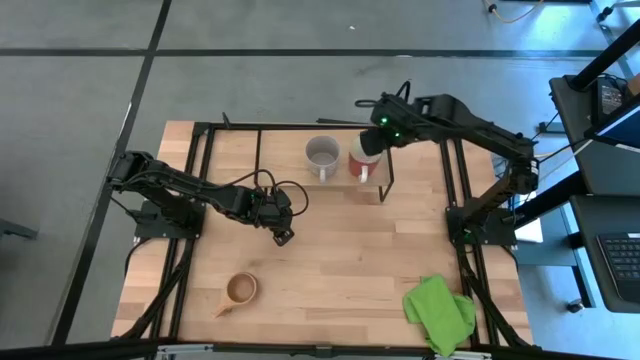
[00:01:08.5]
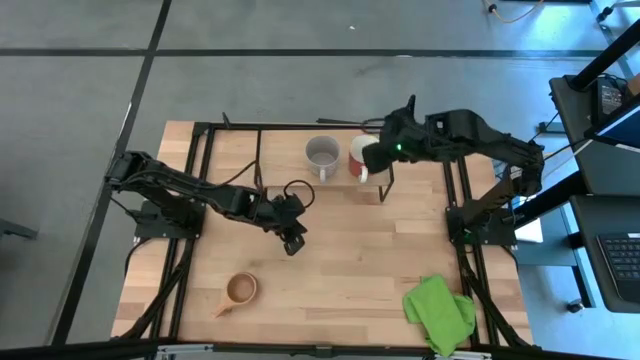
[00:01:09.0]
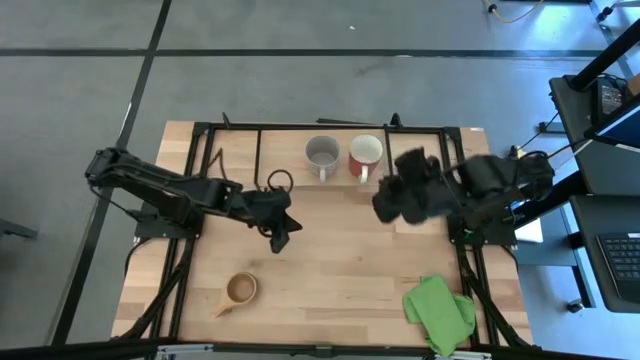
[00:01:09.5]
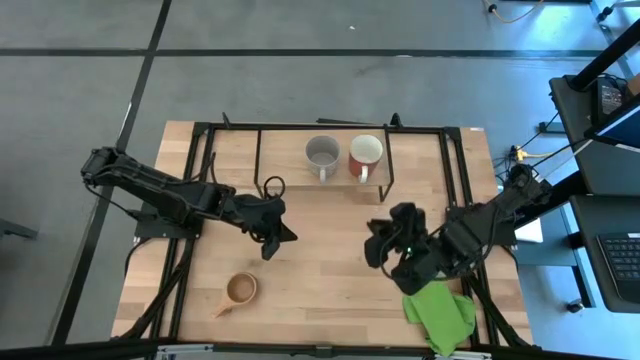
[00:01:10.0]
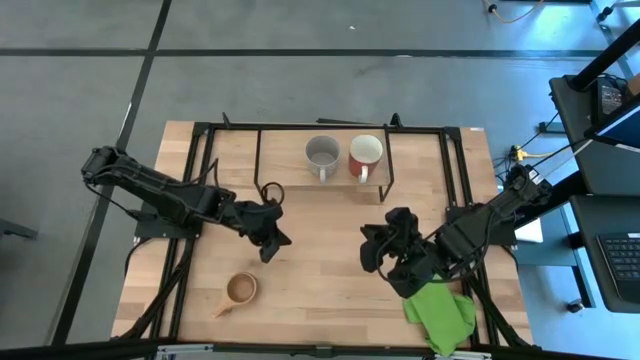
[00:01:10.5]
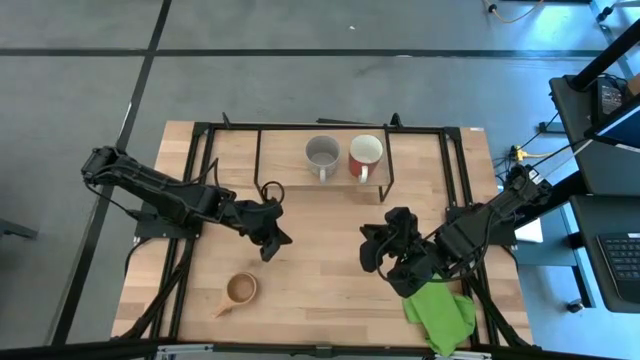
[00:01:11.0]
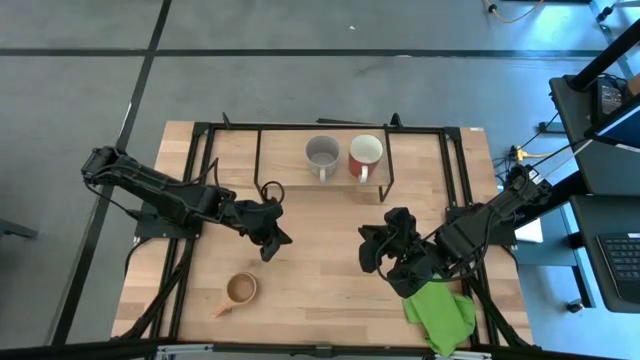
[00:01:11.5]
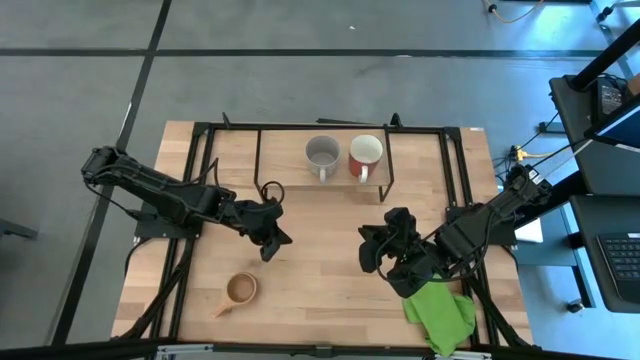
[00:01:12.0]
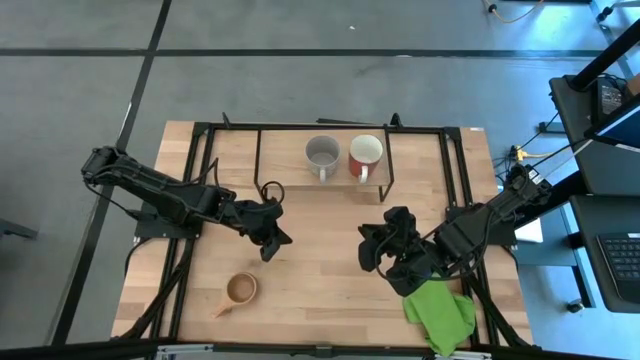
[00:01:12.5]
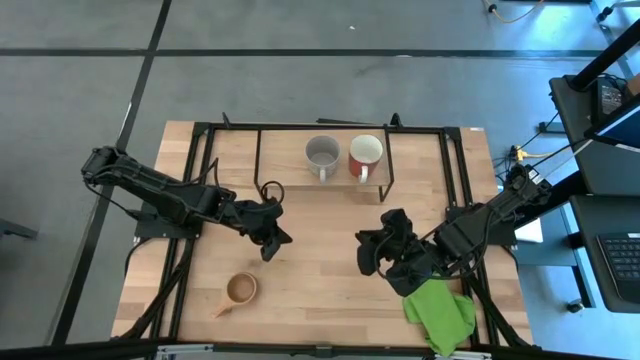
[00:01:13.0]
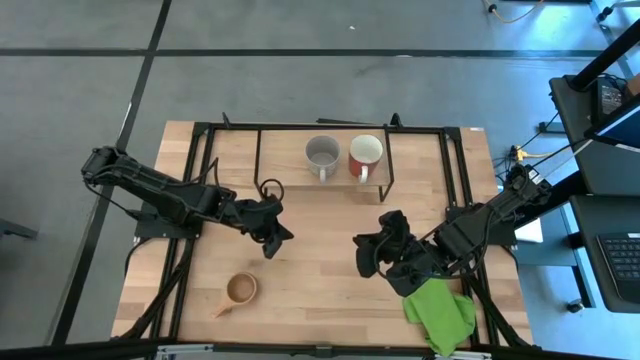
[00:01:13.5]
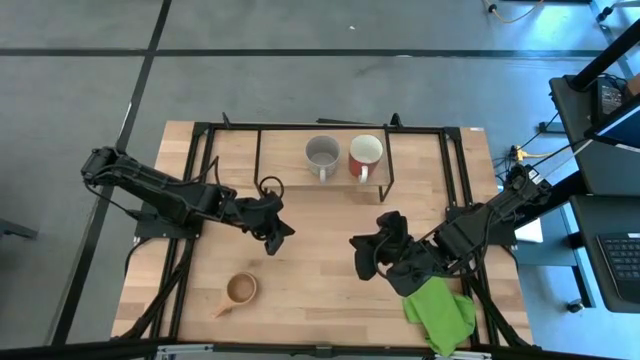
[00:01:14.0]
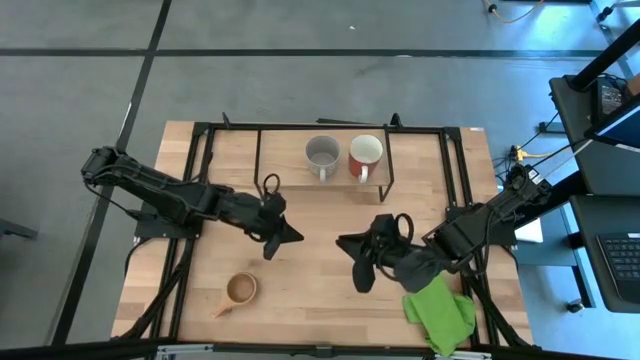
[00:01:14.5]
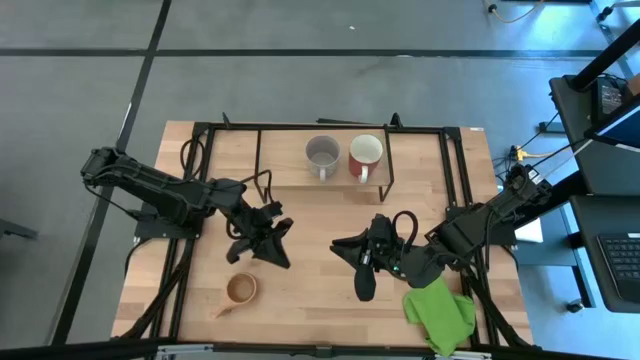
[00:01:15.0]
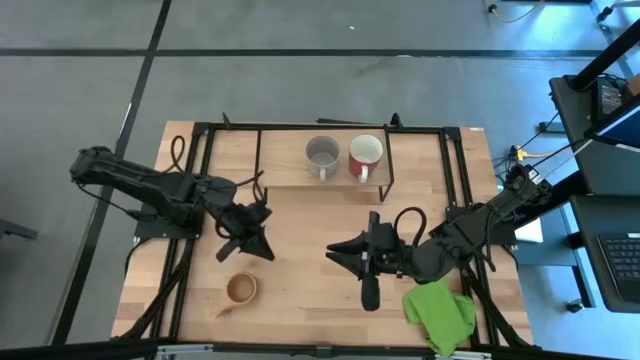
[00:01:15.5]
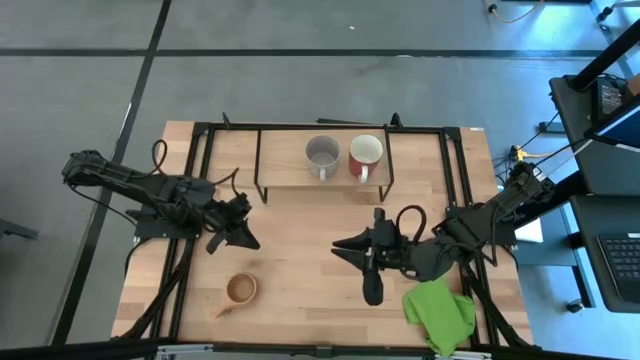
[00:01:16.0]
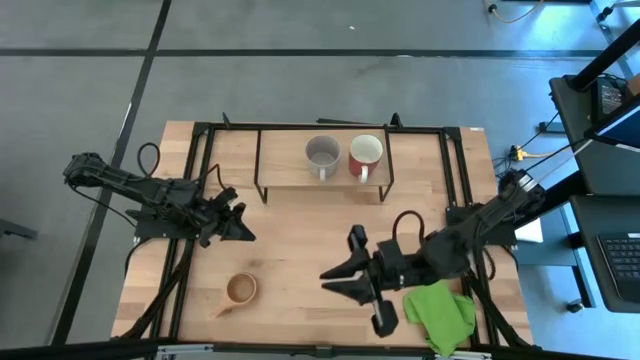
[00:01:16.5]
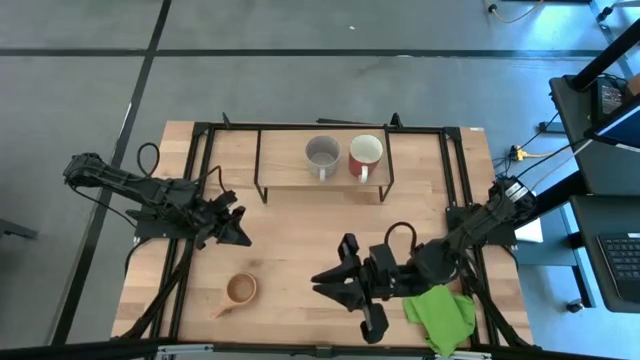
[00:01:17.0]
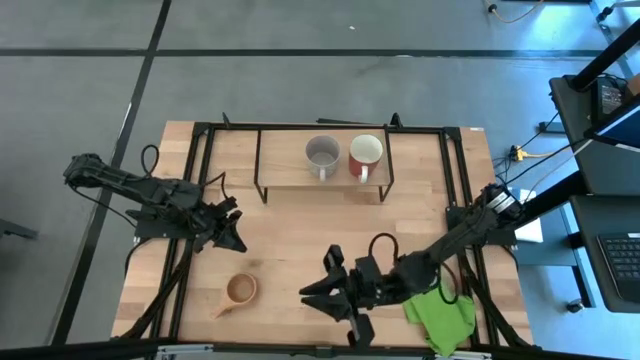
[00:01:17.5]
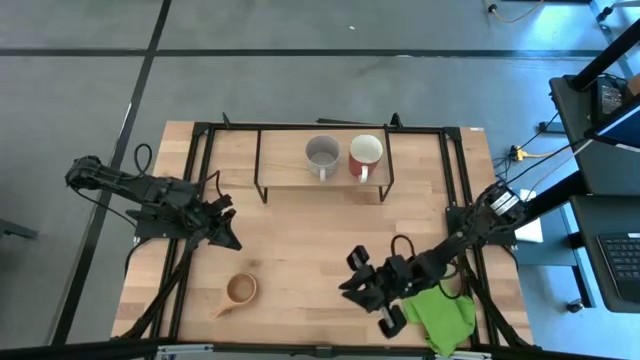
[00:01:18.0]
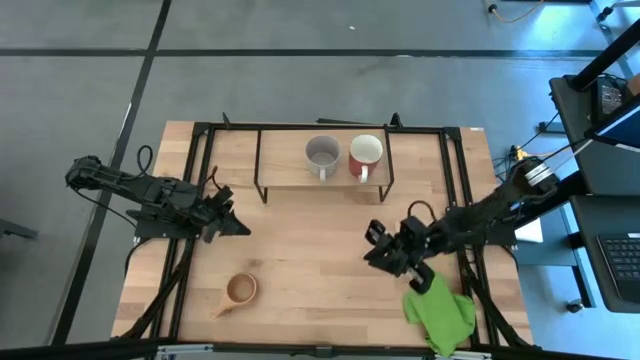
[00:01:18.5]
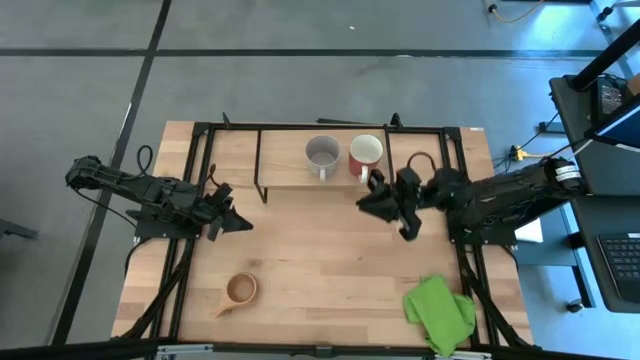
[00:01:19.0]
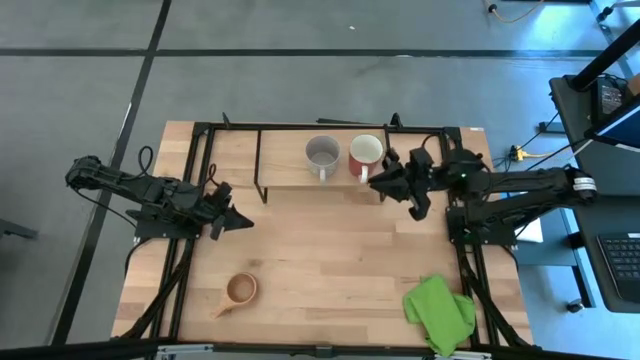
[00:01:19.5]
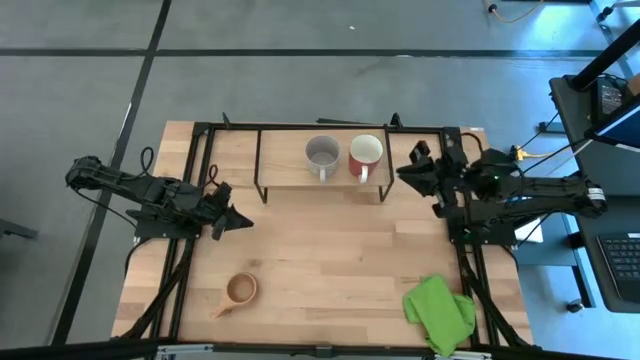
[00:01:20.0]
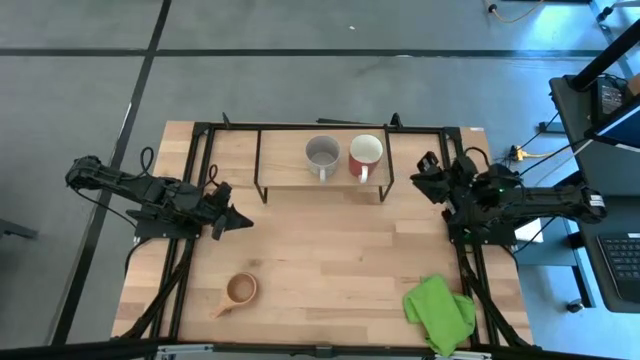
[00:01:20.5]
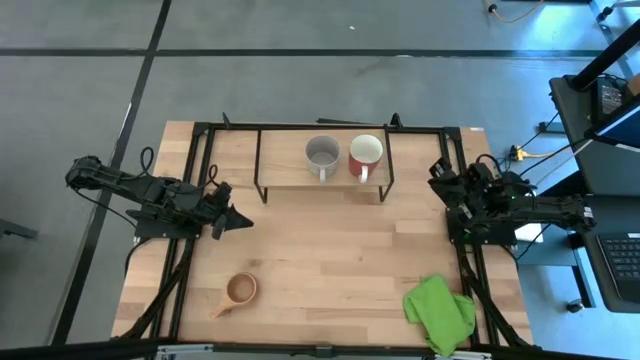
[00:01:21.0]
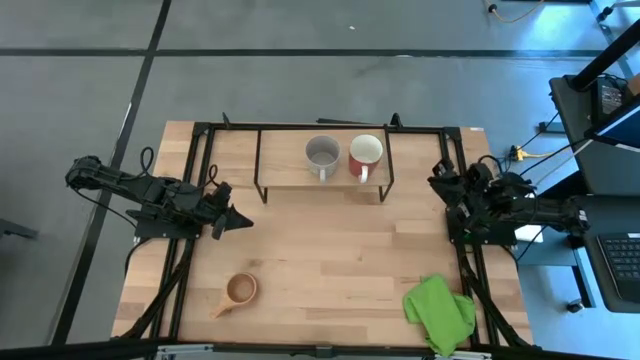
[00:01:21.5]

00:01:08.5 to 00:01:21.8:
Task: Stack small to large cups/mugs on shelf
Put the brown mug on the shelf

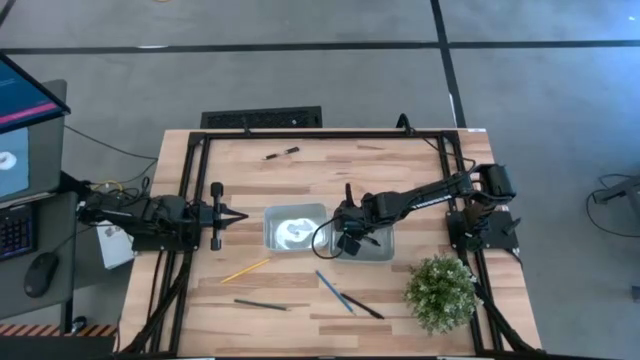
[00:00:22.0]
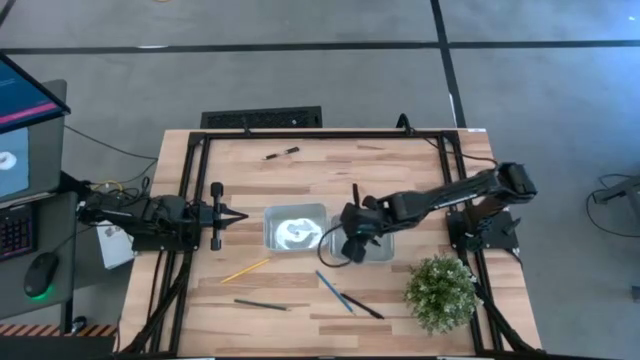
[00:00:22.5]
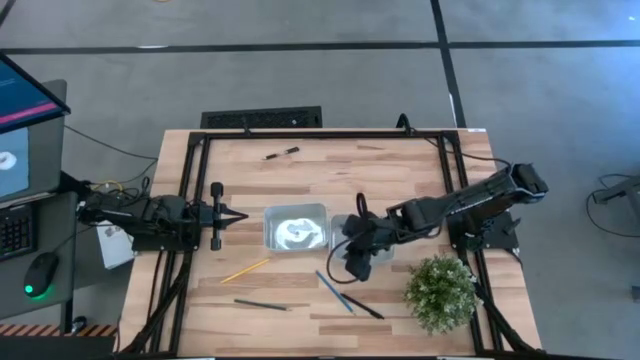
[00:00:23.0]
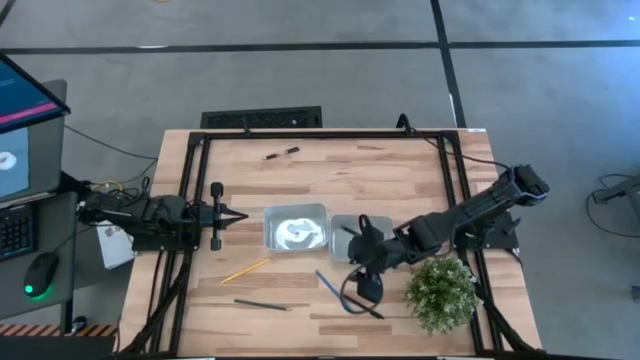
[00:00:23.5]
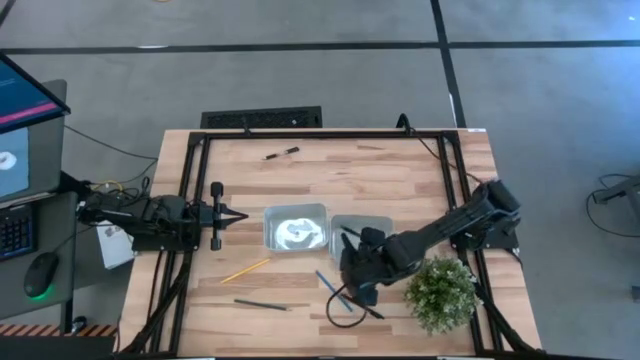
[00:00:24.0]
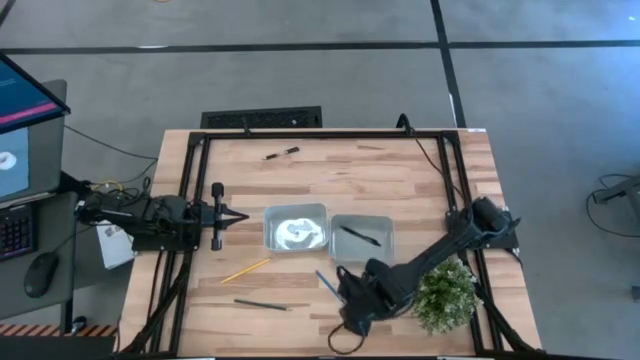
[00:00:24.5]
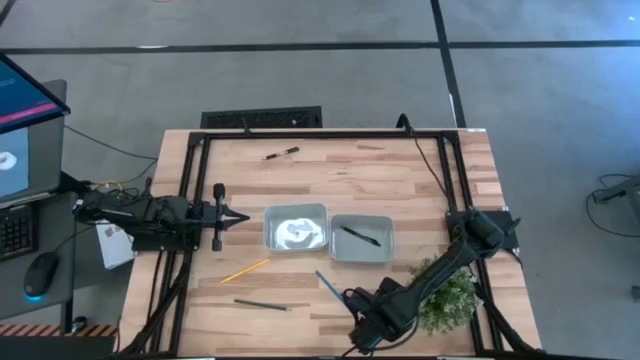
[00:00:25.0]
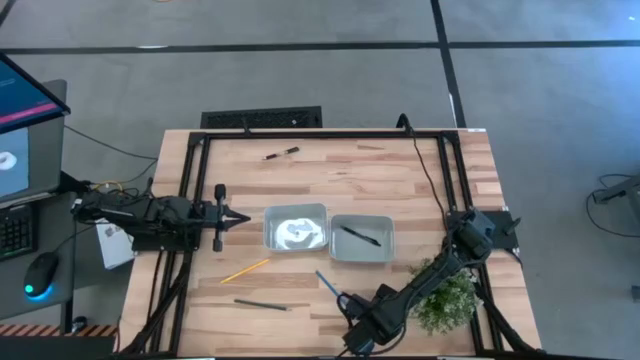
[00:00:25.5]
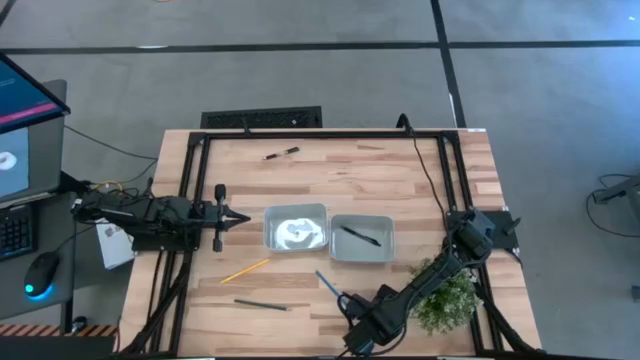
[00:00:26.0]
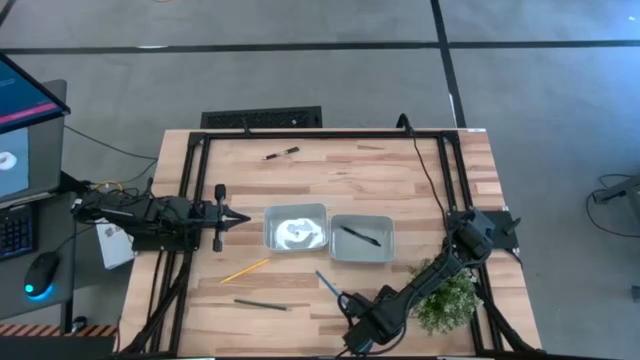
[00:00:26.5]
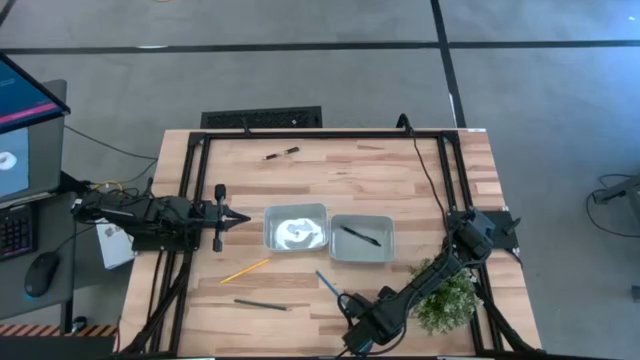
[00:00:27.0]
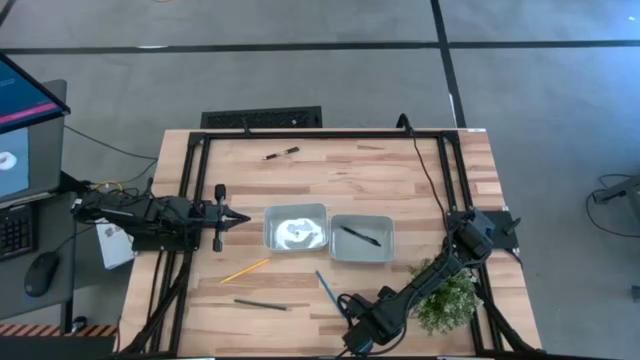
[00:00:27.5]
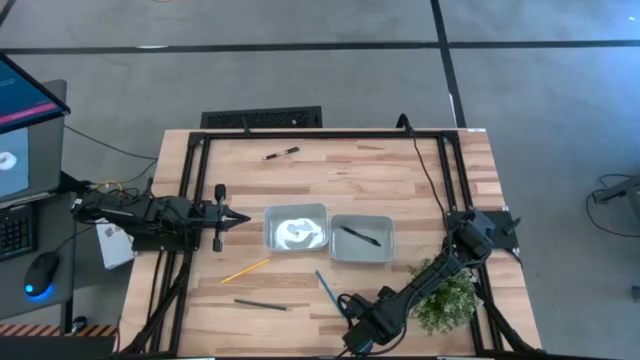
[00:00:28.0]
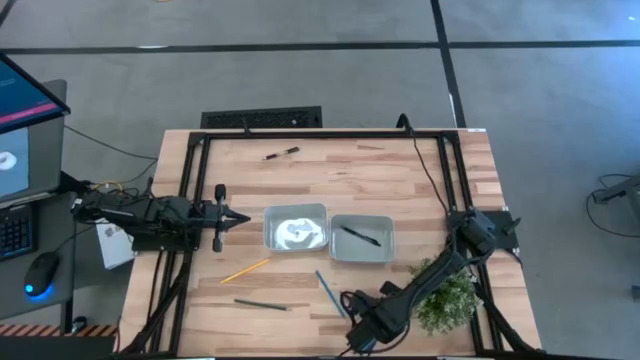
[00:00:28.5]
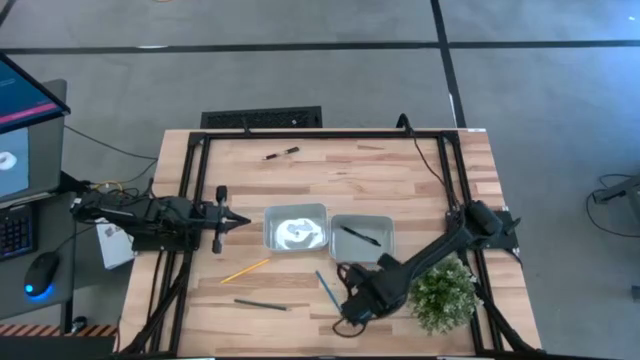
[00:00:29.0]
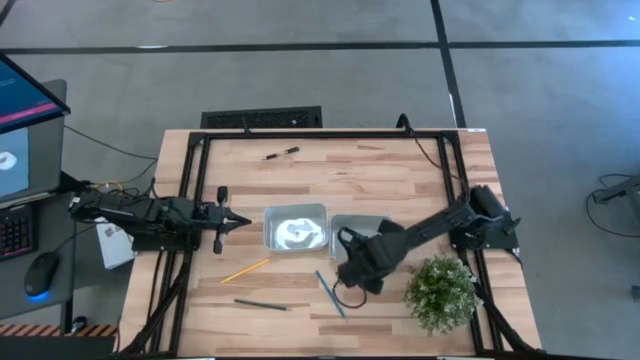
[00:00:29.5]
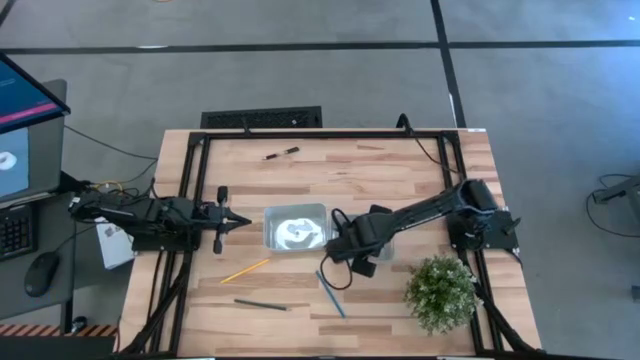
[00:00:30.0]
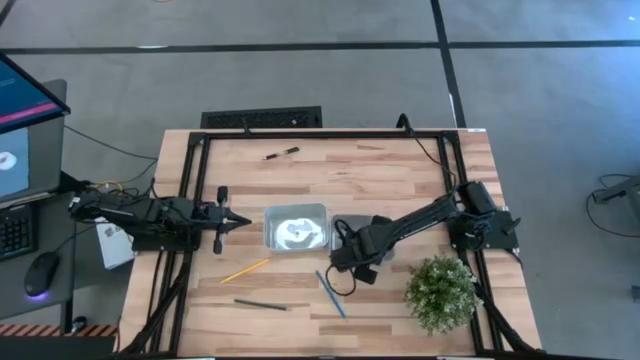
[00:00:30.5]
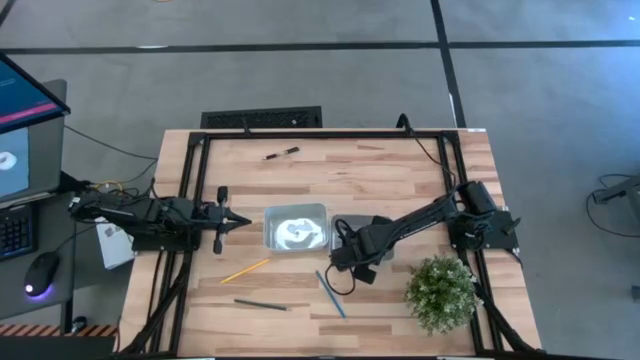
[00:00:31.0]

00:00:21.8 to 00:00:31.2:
Task: Sort pens & pencils
Put the bottom black pen into the right gray bin
